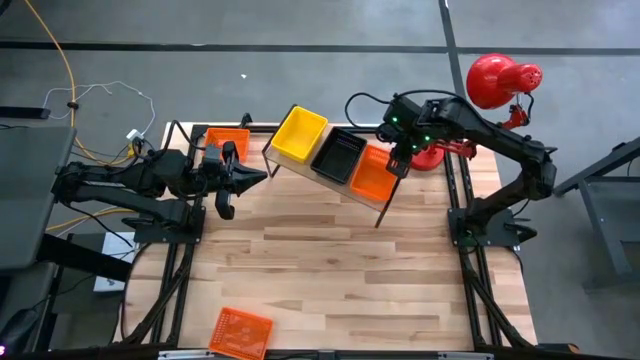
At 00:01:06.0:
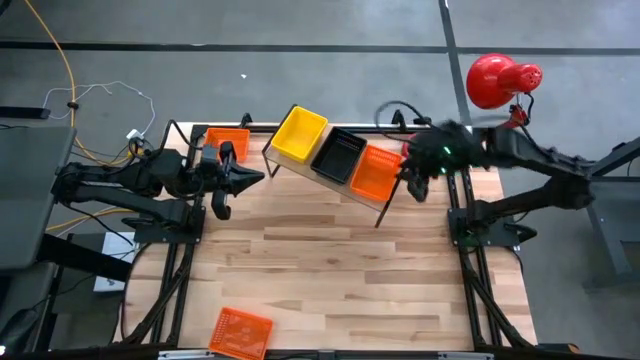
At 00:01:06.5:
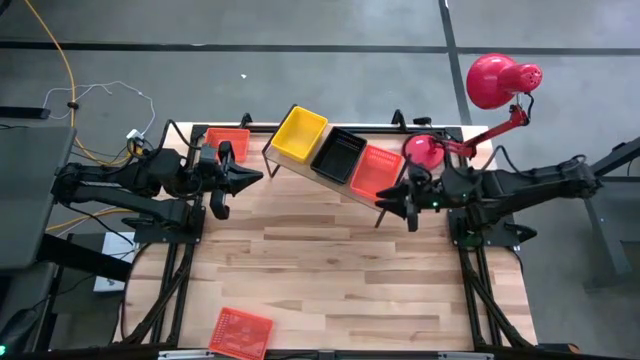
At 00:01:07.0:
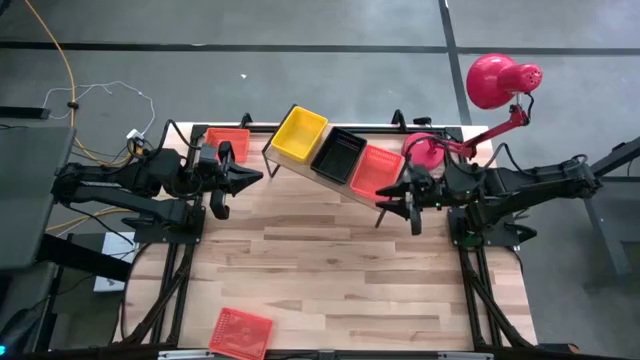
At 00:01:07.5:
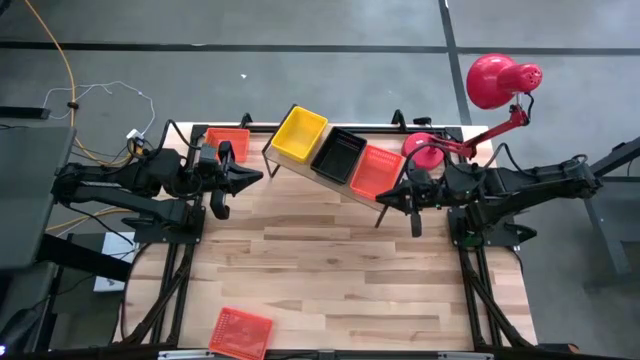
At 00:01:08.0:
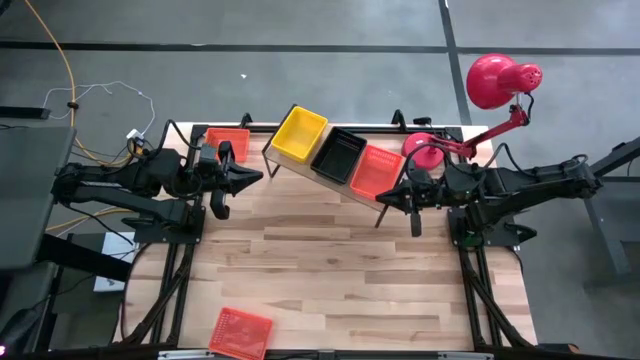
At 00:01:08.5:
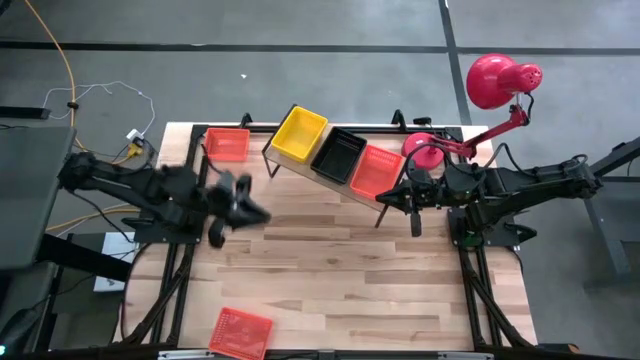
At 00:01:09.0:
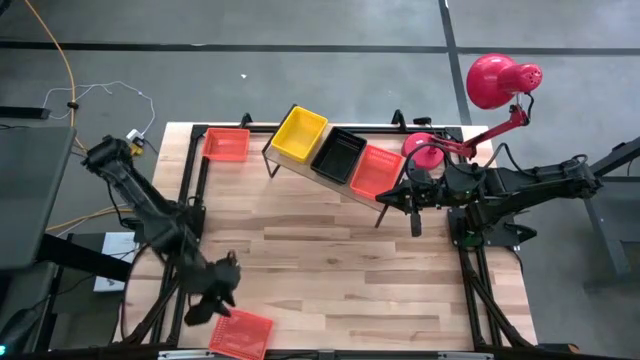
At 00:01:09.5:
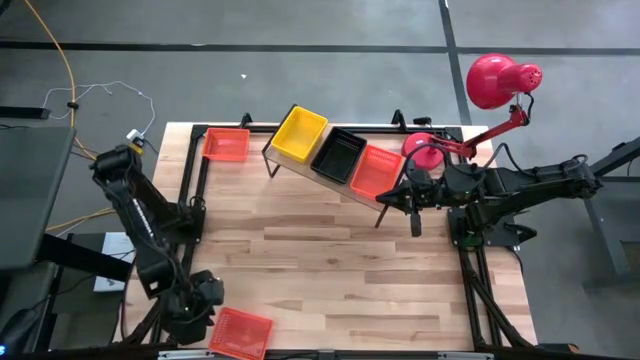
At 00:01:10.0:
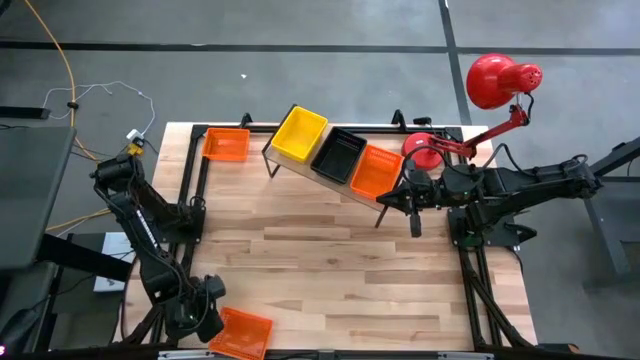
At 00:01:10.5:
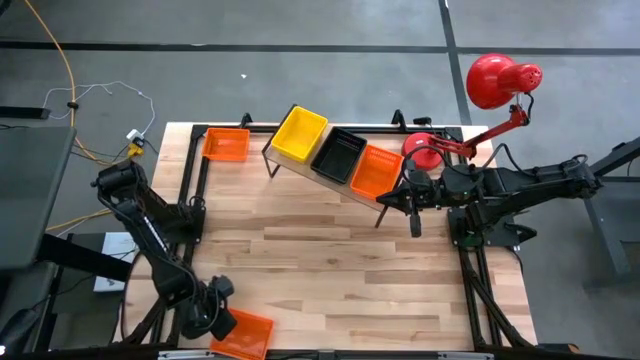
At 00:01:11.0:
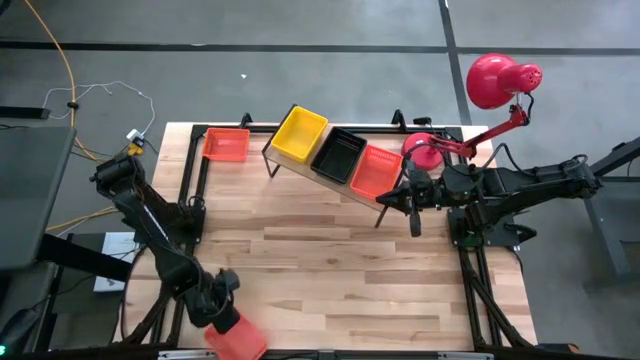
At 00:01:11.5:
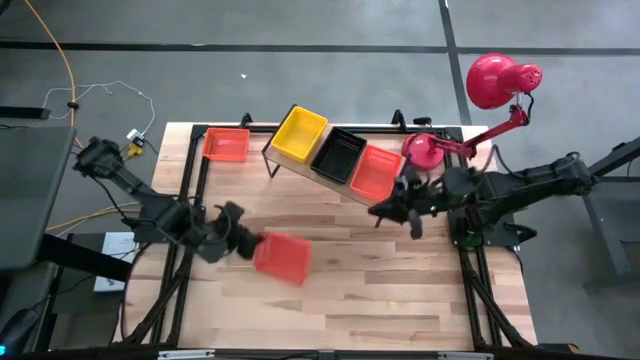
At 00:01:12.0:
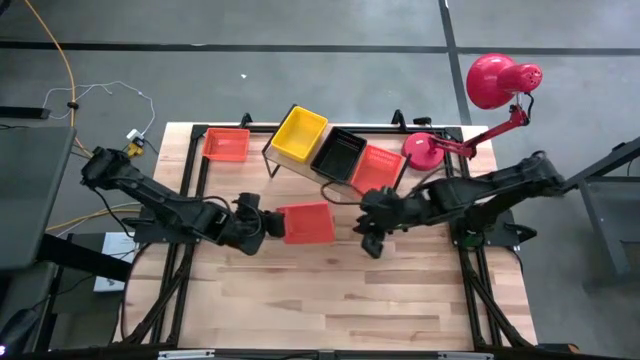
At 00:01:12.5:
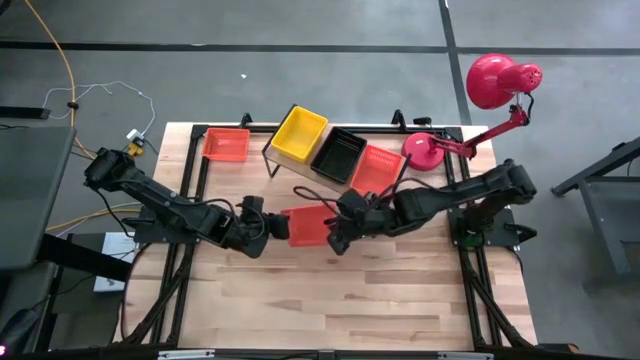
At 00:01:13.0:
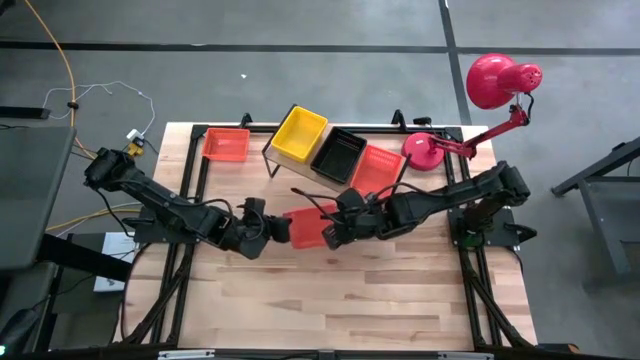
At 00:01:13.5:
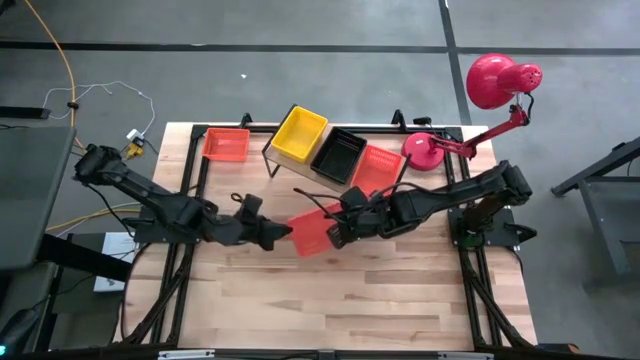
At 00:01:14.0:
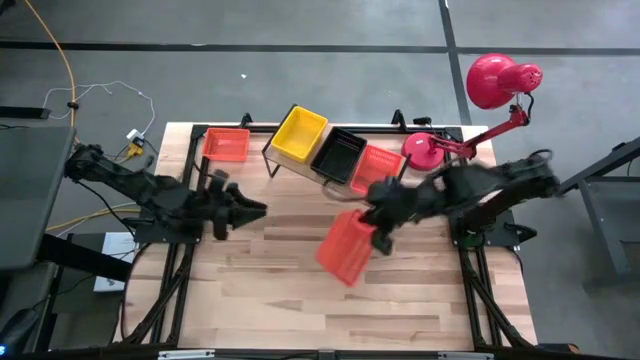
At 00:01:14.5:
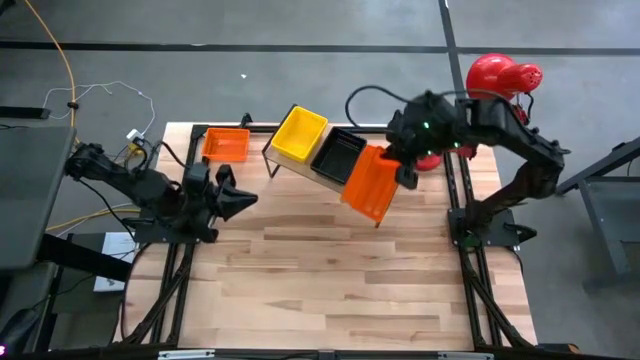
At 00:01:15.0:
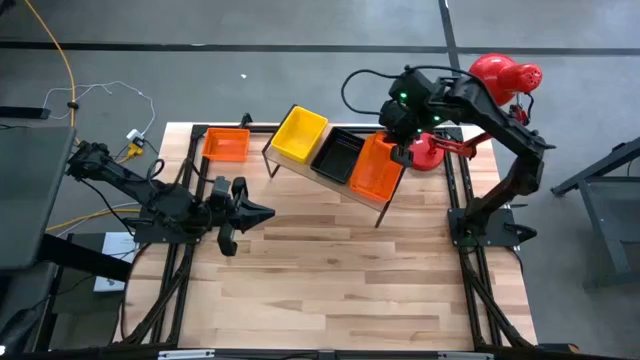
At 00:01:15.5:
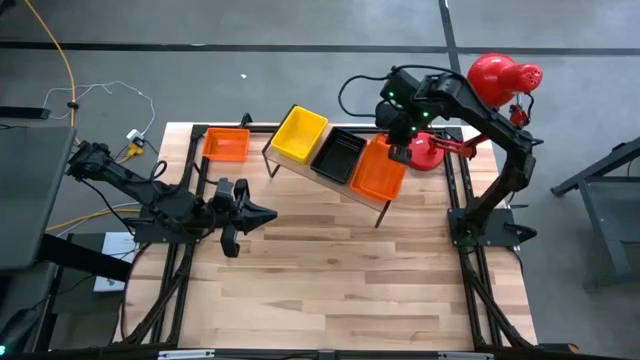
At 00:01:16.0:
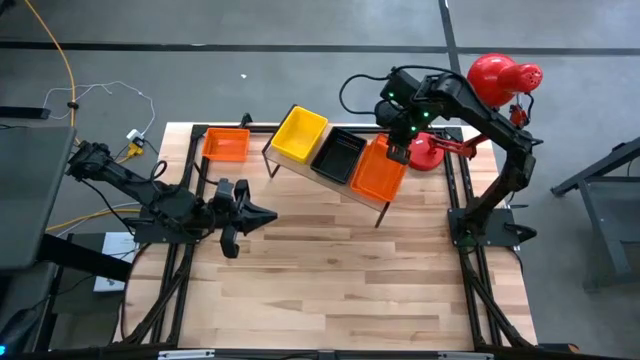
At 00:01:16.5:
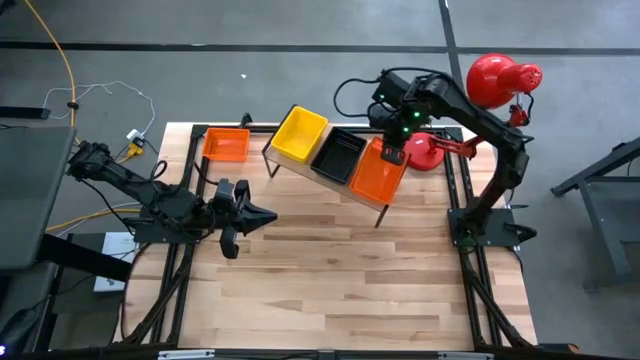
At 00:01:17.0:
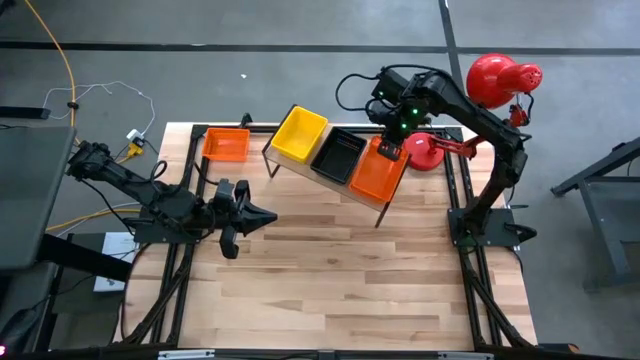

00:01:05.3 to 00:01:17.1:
Task: Stack baskets on shelf by color
Stack the bottom orange bin on top of the orange bin on the shelf

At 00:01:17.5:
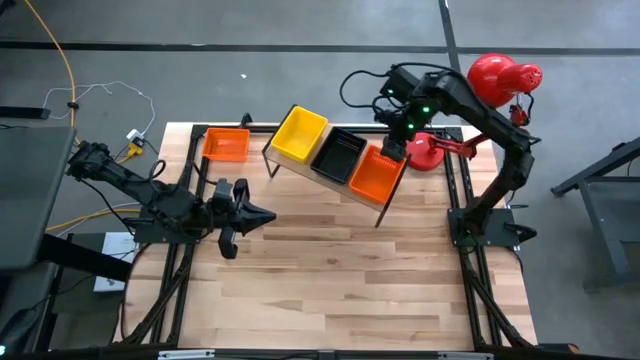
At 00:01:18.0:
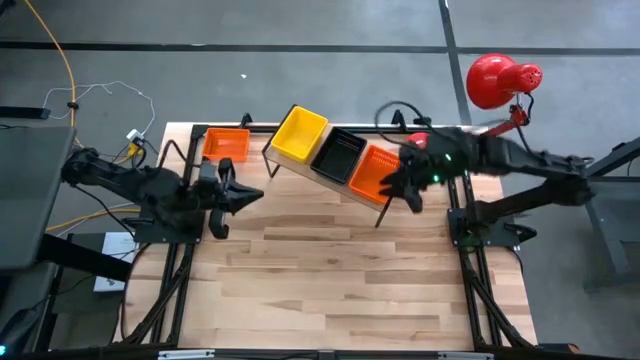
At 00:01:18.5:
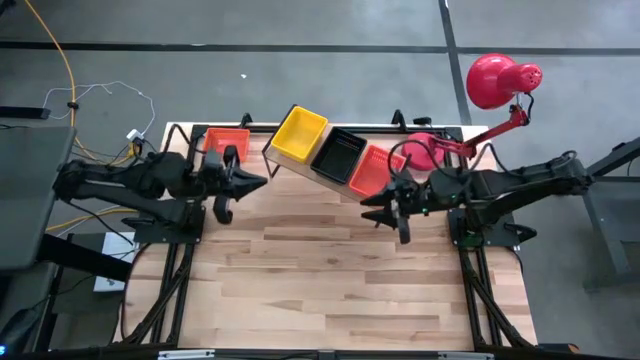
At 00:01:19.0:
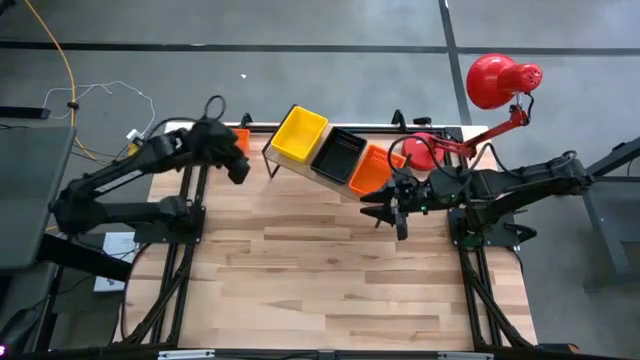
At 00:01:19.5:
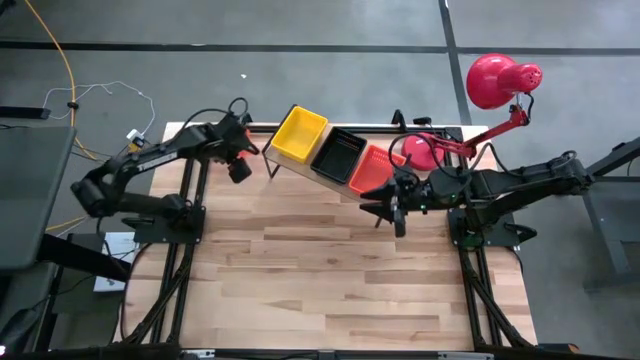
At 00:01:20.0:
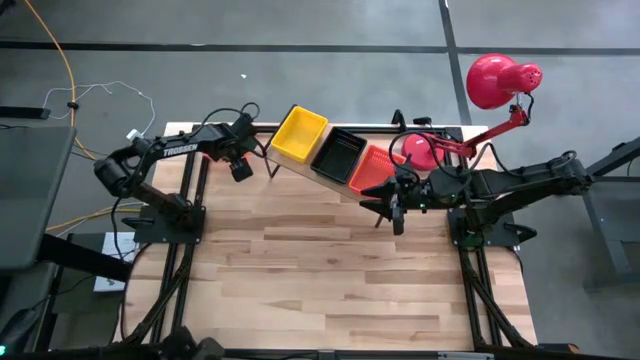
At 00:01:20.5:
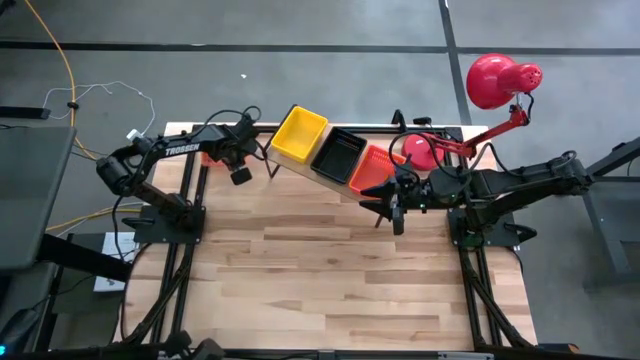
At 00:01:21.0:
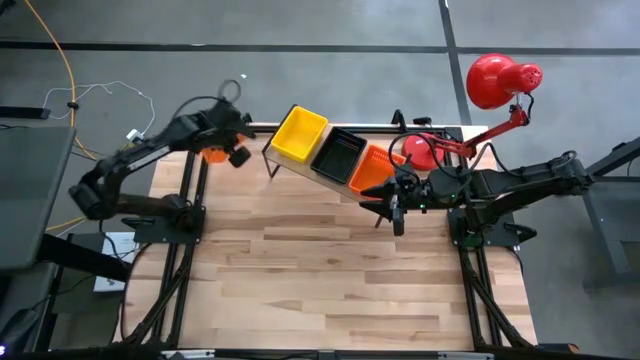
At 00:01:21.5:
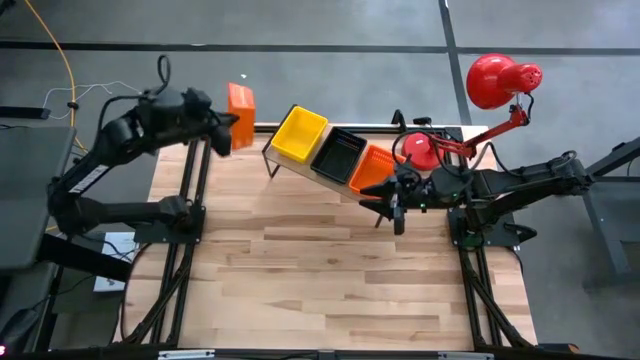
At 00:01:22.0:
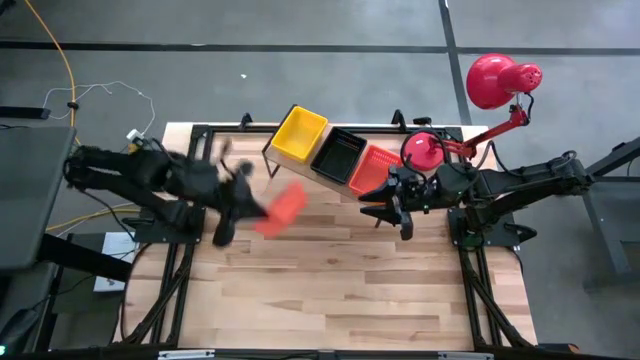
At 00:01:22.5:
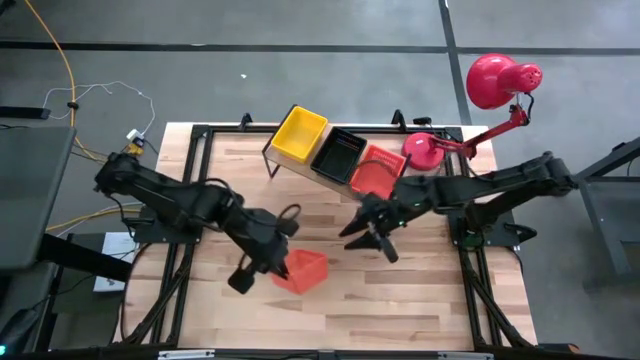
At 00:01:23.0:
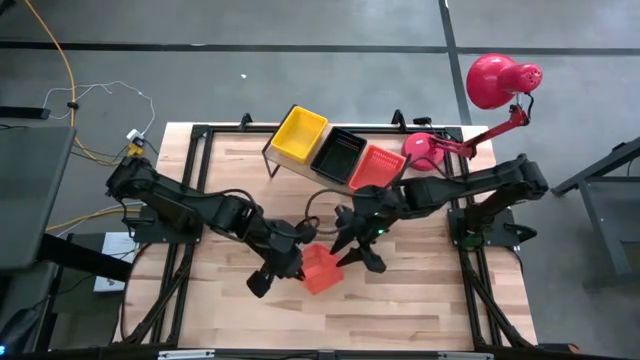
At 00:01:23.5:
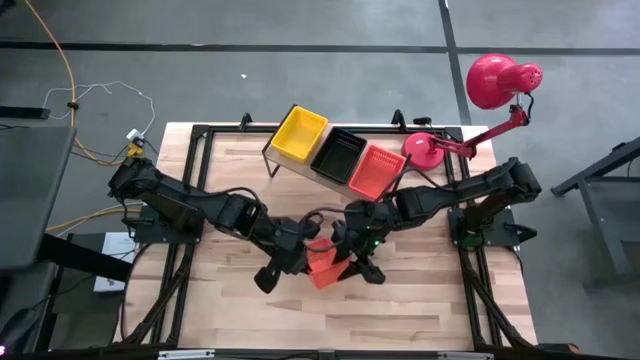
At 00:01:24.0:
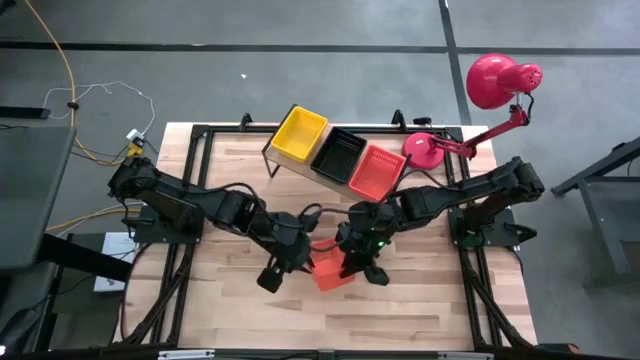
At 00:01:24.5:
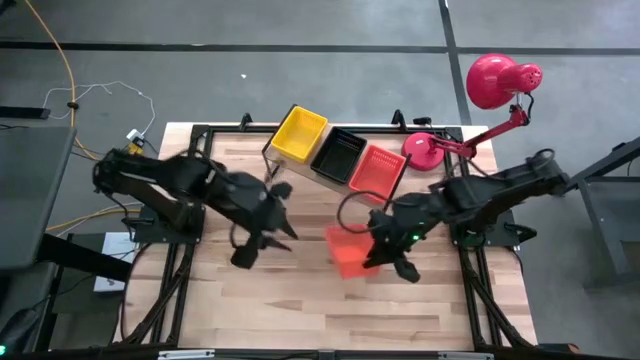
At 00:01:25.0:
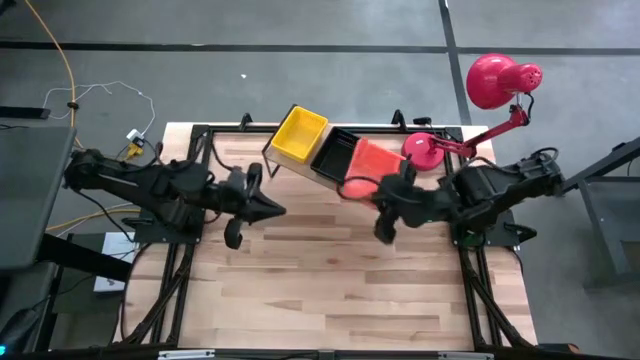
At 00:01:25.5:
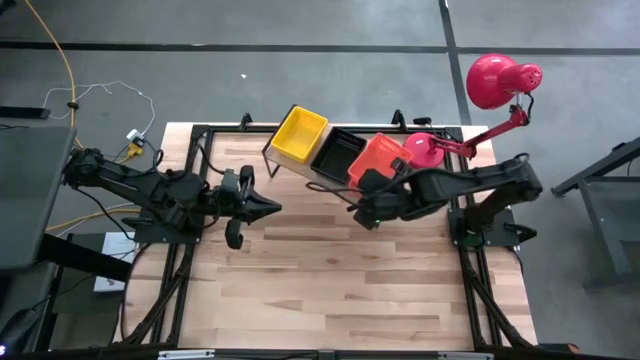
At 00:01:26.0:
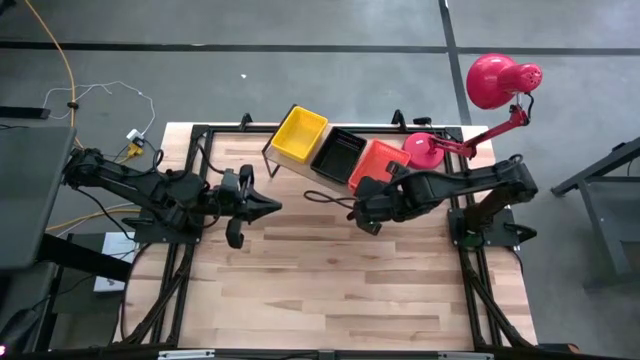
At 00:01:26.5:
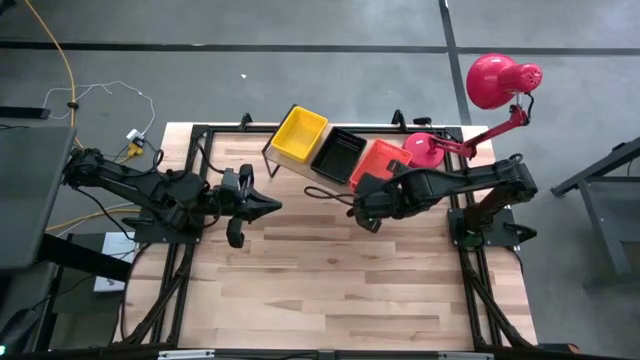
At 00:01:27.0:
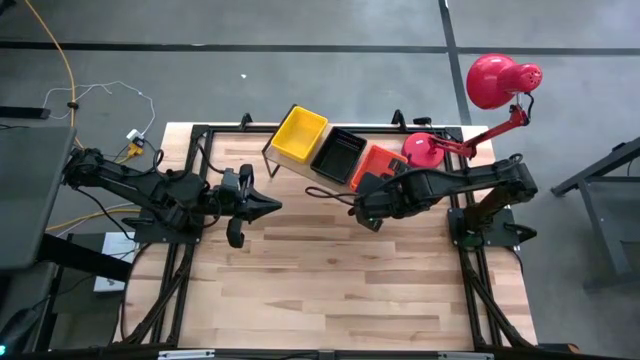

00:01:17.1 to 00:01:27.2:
Stack the orange bin on top of the orange bin on the shelf
